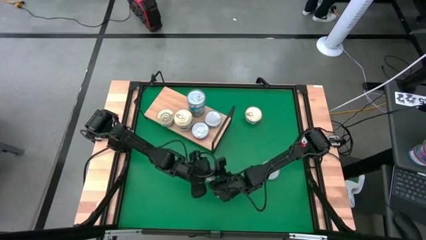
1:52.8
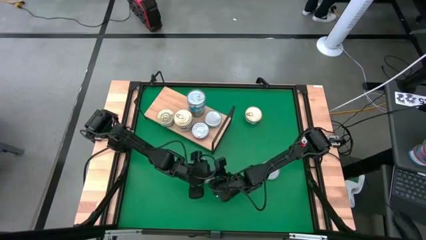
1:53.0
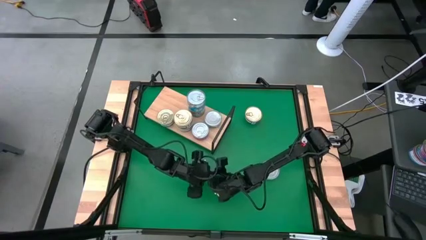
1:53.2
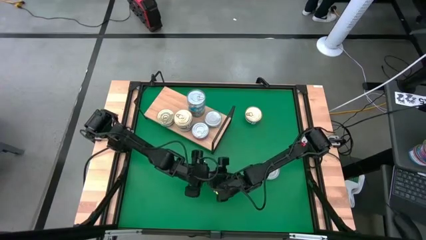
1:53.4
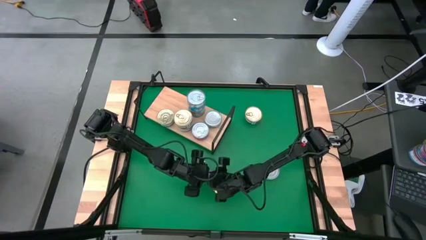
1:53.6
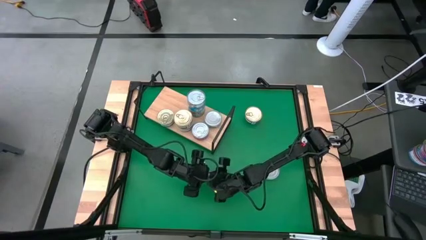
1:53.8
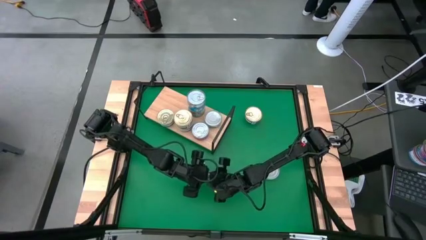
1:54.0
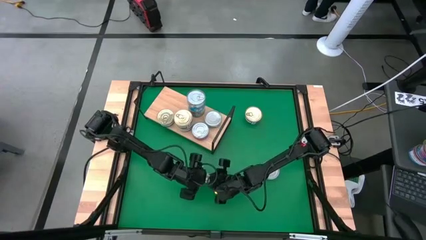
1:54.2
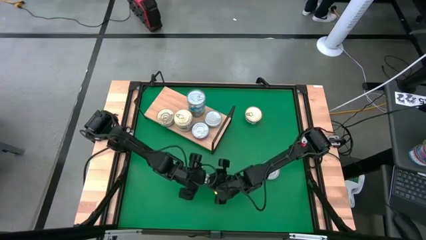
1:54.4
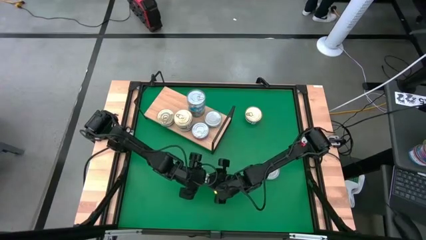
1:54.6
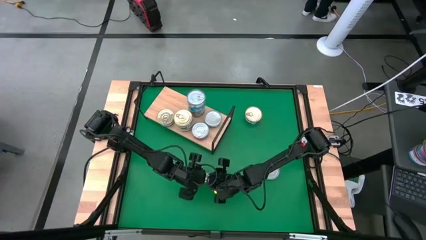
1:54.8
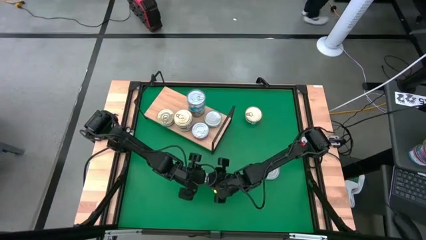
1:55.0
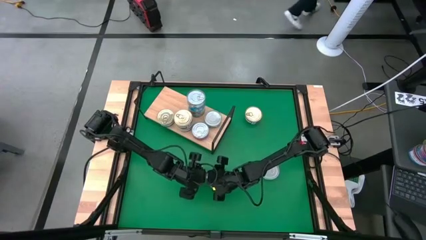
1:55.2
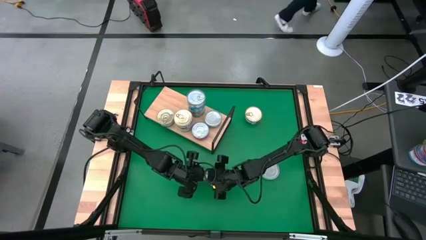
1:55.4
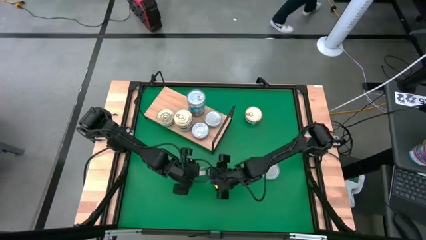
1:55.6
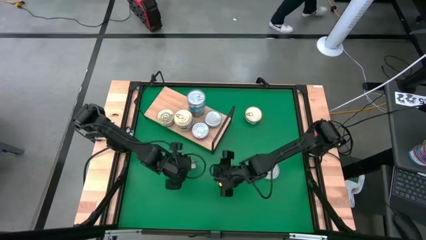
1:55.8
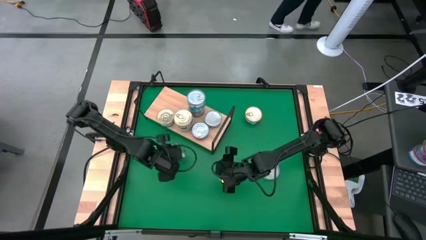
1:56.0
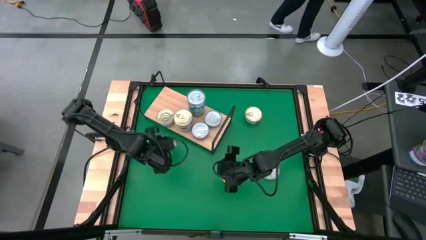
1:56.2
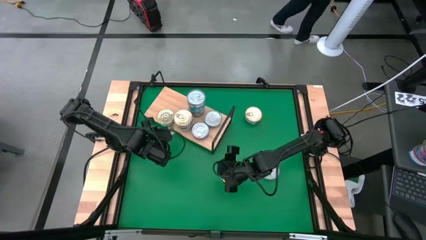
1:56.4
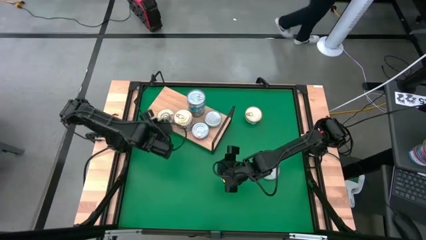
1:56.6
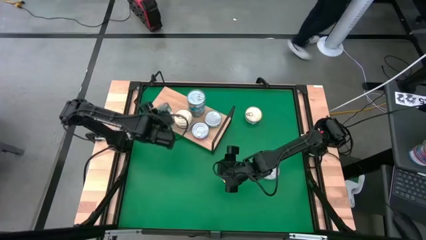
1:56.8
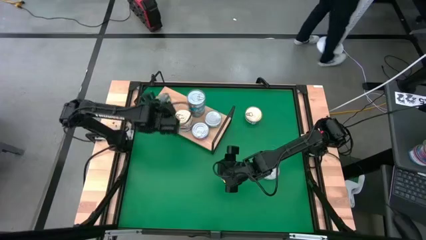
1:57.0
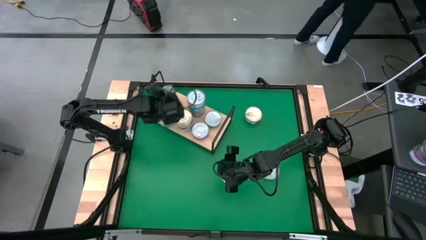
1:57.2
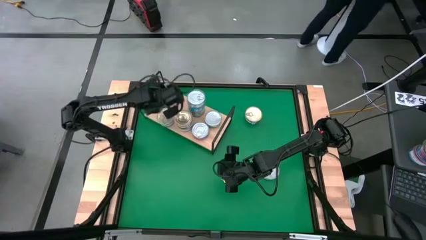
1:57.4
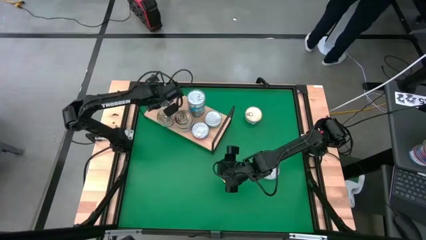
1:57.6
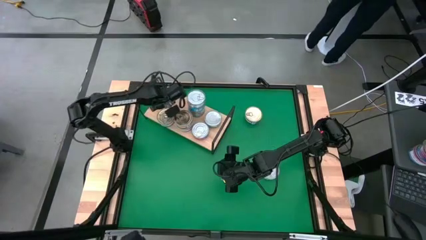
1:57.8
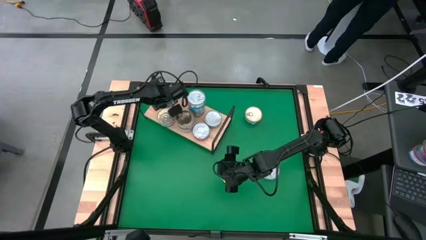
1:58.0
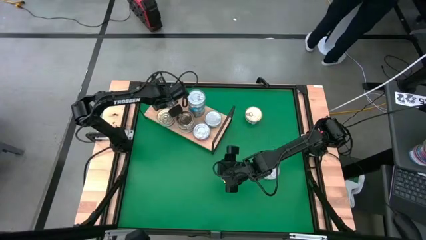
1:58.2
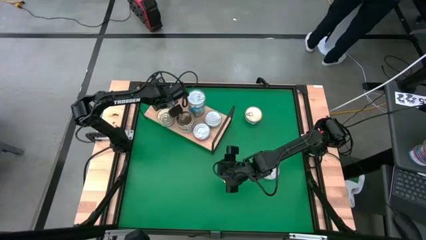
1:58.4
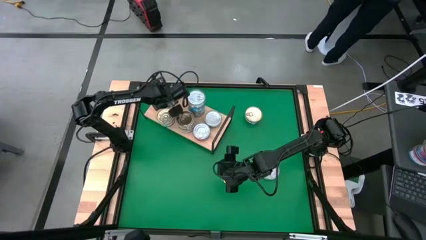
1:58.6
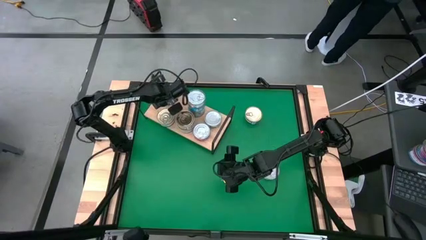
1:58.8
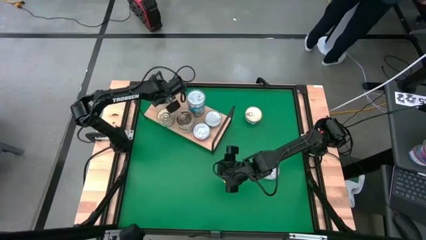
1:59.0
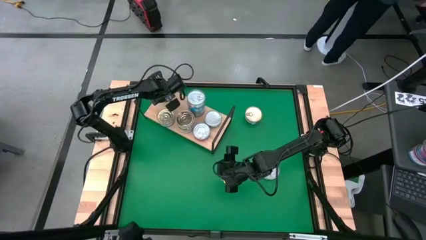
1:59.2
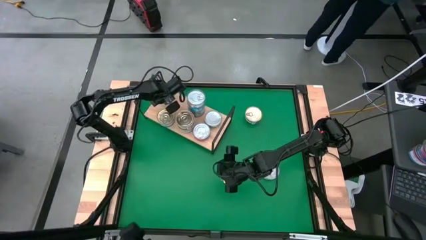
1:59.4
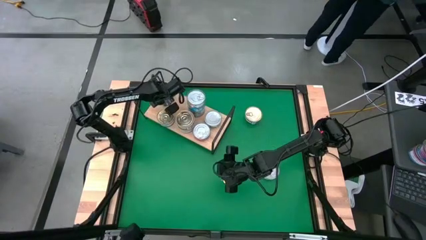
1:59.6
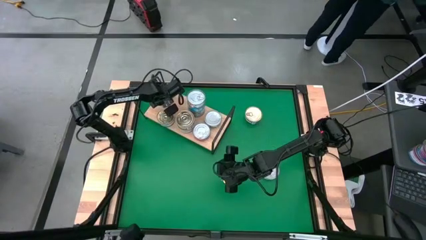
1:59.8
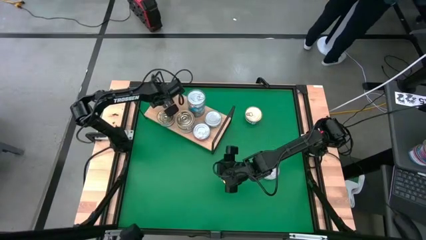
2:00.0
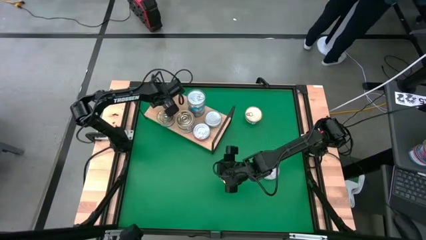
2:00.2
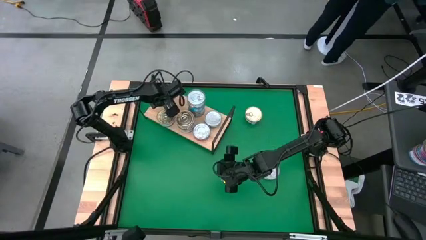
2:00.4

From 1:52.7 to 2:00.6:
Task: Stack canned seafood by type on shelf
Put the green tuna can on the shelf

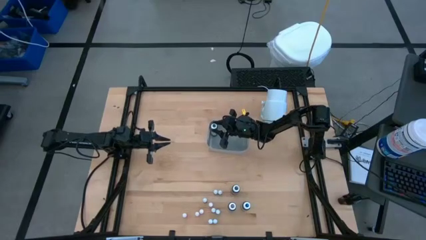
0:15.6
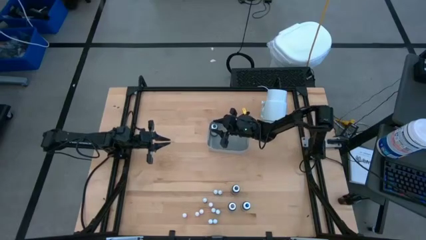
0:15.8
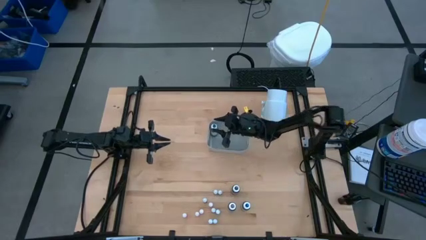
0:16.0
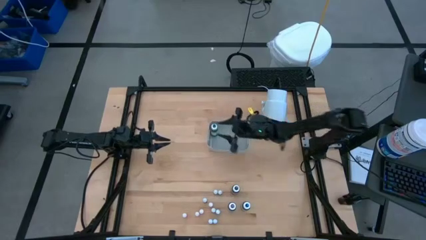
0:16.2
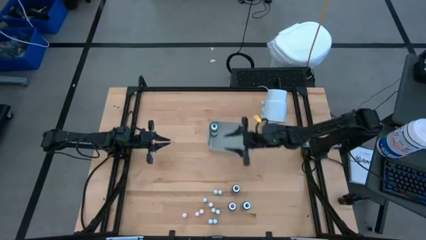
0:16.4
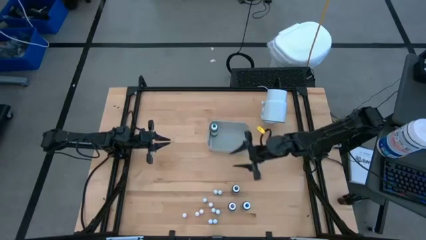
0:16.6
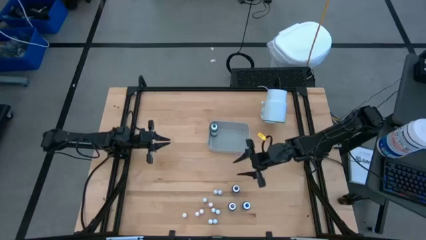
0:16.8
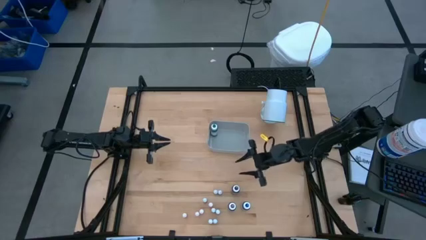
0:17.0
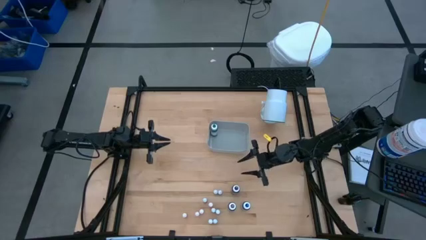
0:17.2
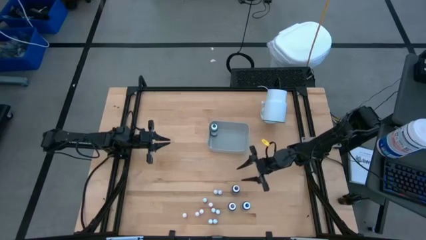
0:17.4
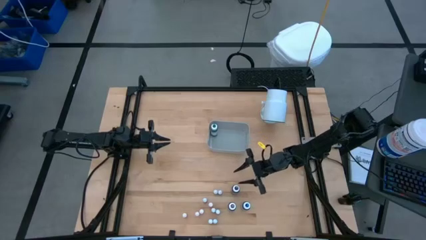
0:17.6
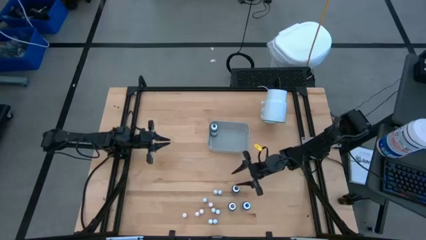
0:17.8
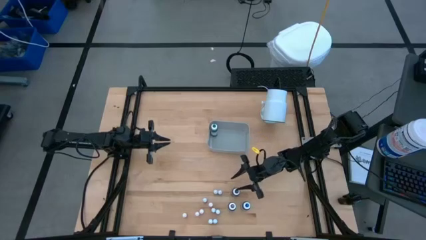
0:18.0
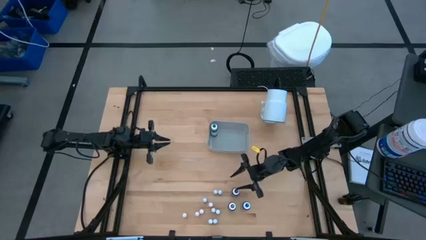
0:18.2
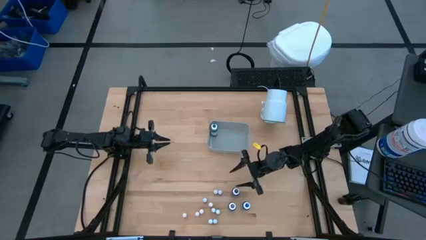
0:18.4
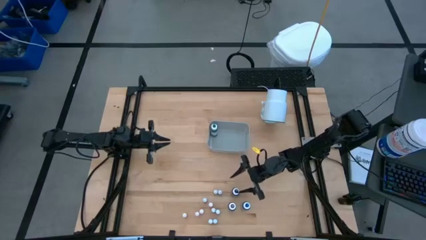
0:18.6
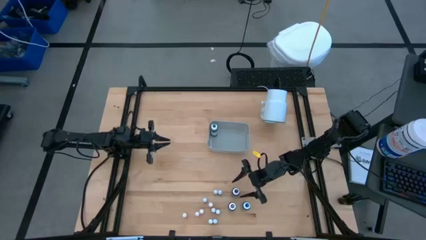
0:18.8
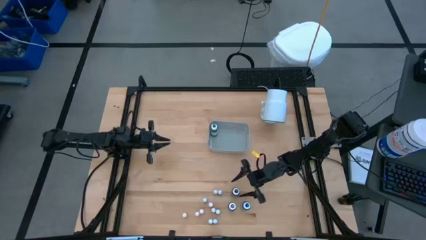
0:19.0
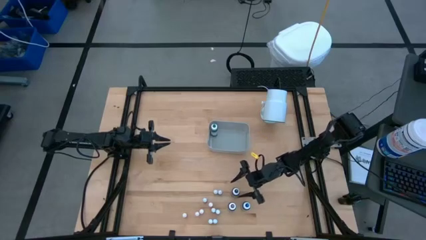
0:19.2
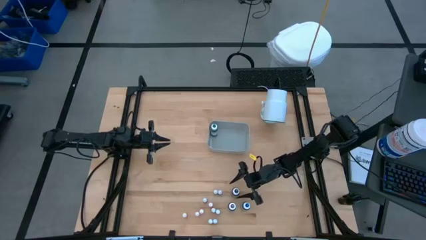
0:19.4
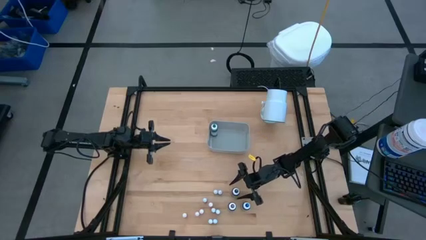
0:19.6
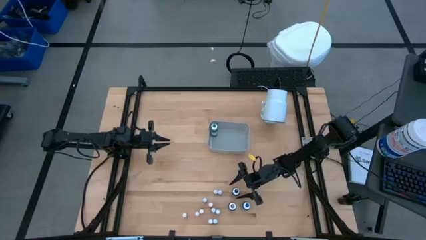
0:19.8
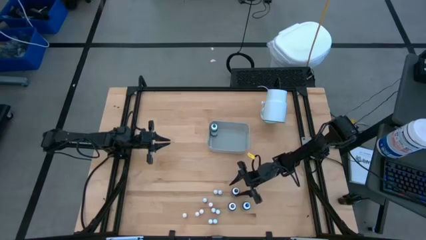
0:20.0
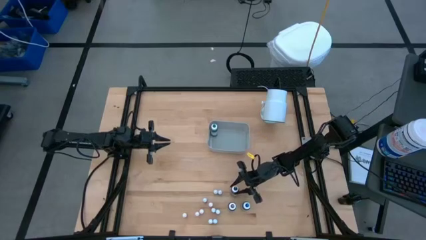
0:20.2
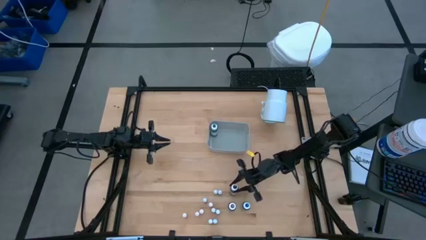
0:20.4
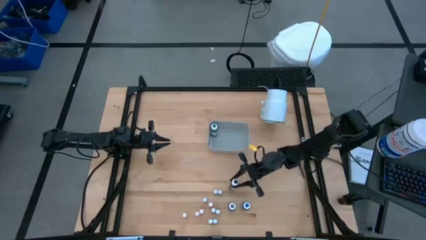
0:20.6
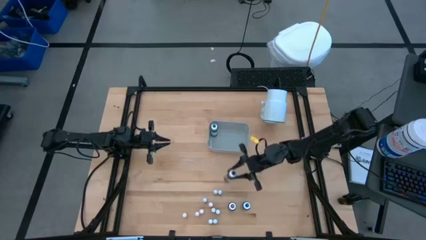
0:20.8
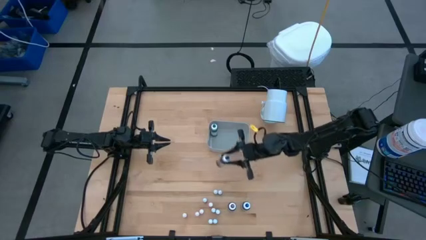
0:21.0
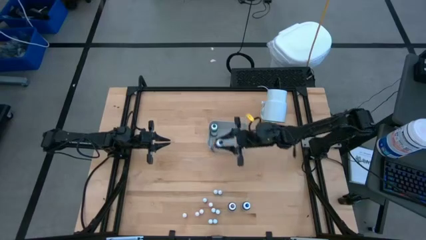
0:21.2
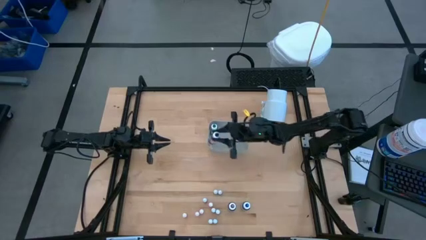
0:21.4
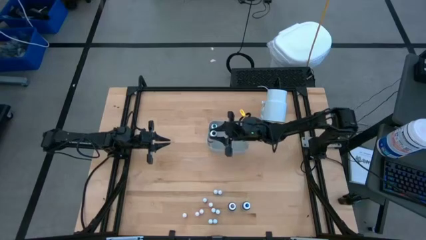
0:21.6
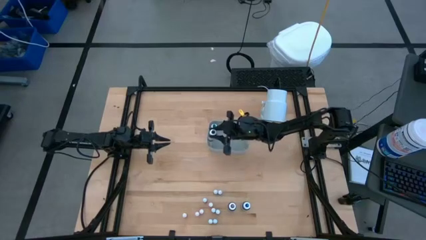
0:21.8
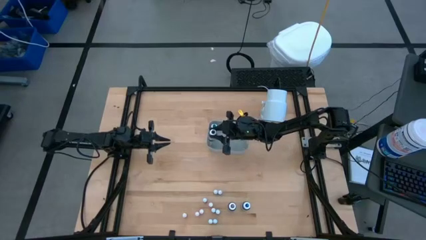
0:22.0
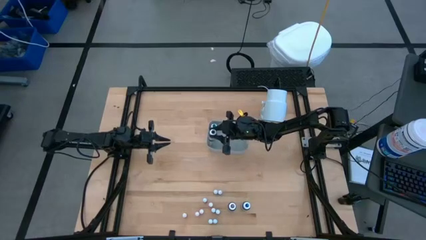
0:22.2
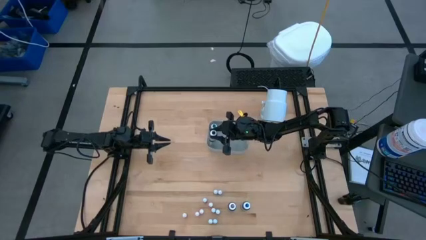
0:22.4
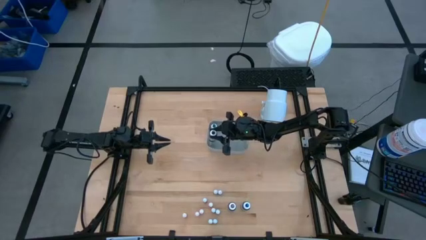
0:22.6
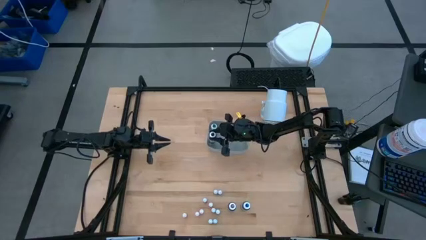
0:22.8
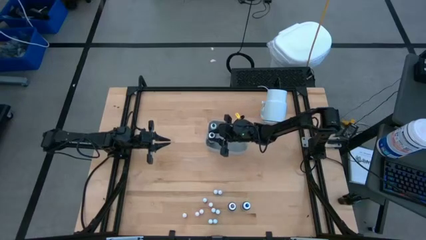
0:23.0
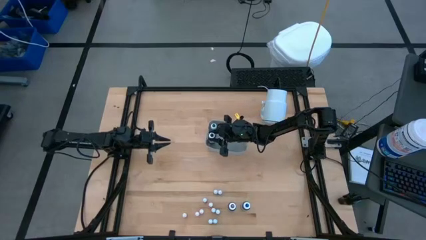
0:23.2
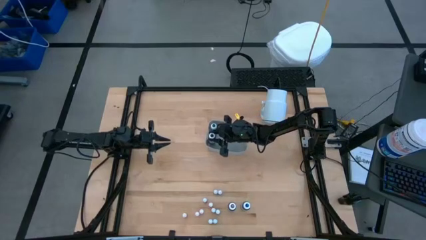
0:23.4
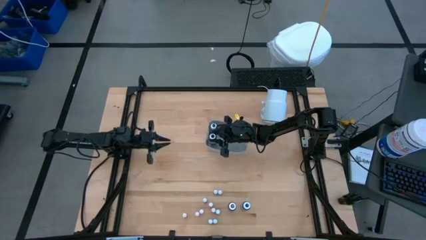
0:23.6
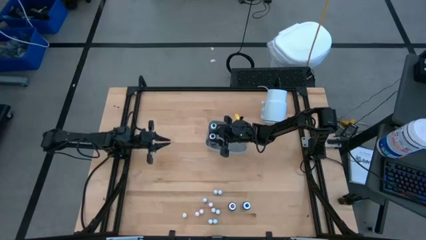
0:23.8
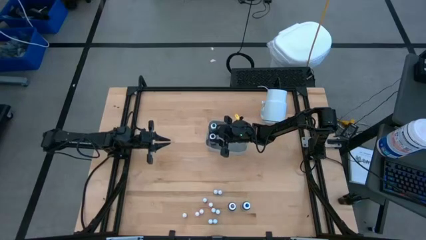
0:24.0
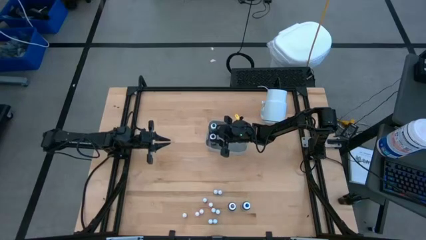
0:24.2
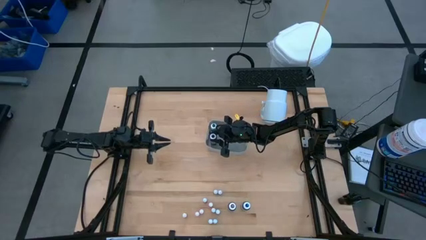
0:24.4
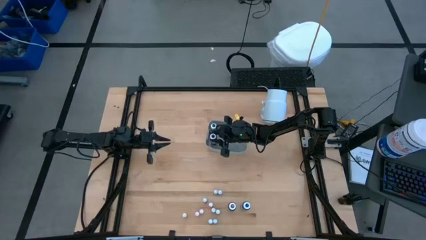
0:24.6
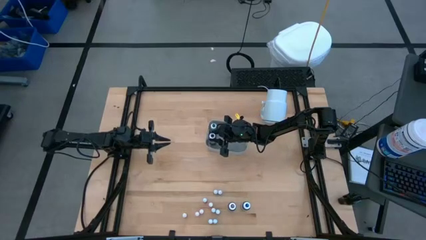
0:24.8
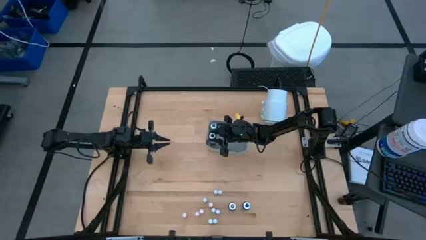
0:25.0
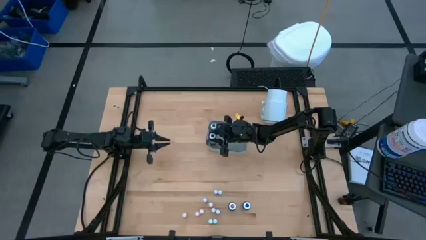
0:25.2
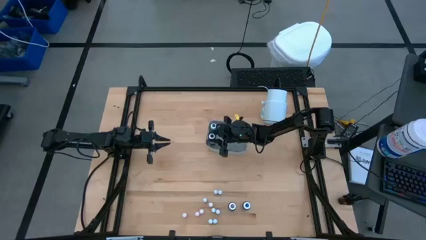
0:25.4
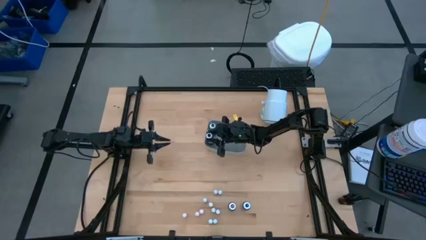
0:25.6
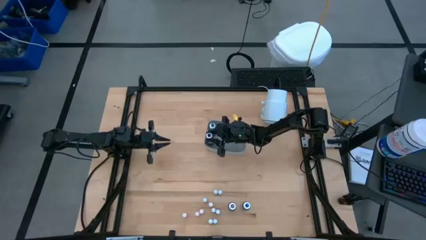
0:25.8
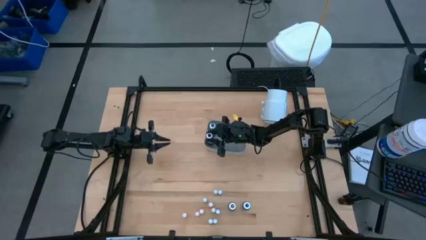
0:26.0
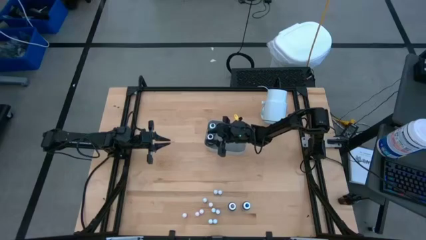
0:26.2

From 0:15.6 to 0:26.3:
Task: Pick & Place food coloring
Put the large black food coloring bottle into the gray bin
